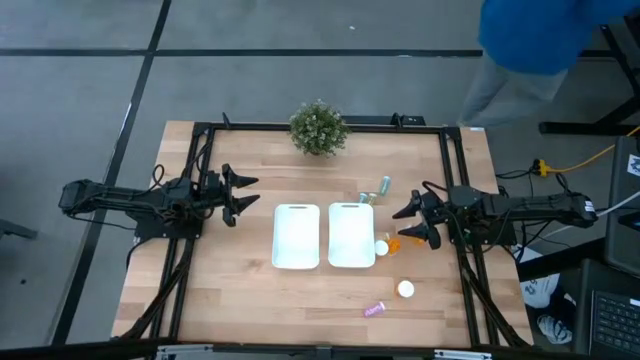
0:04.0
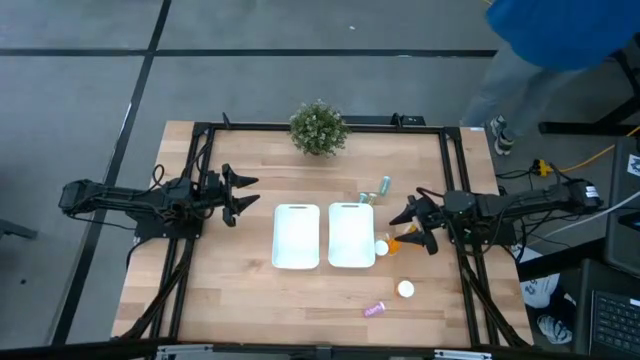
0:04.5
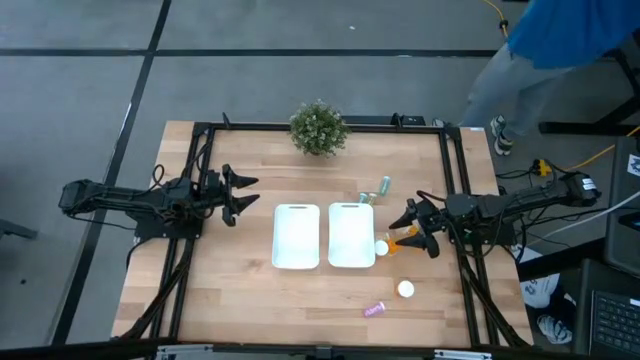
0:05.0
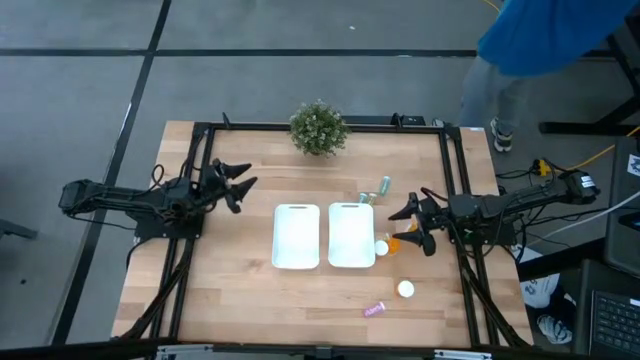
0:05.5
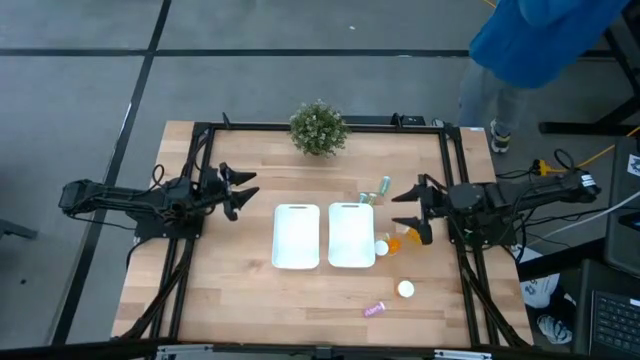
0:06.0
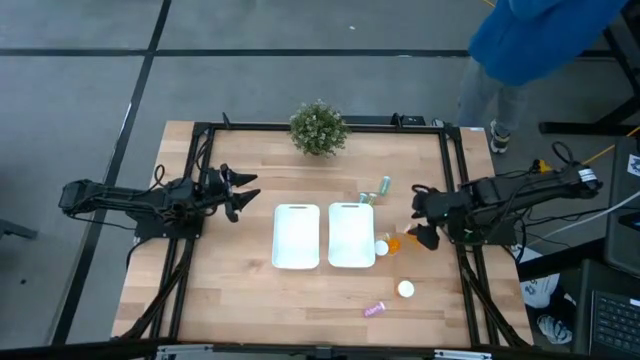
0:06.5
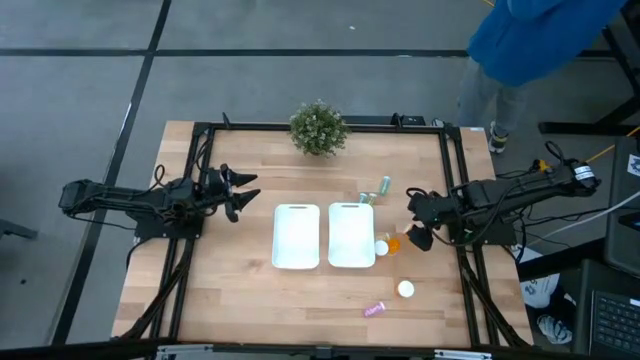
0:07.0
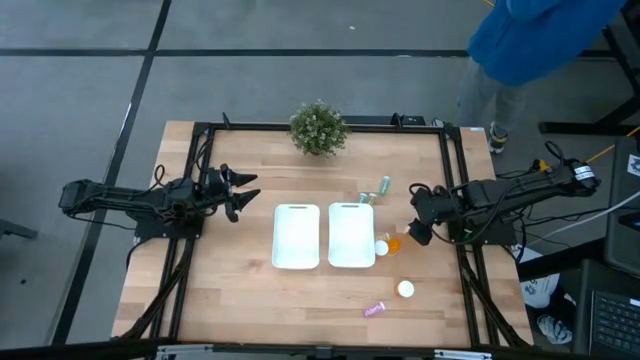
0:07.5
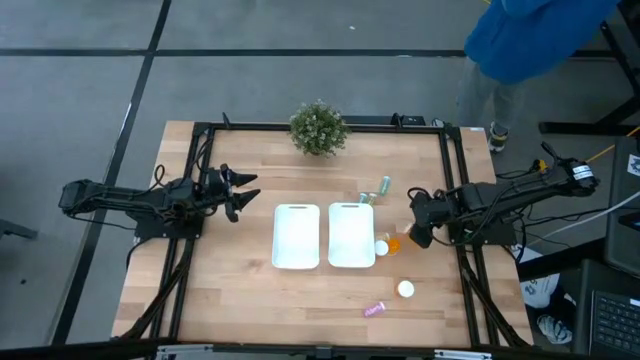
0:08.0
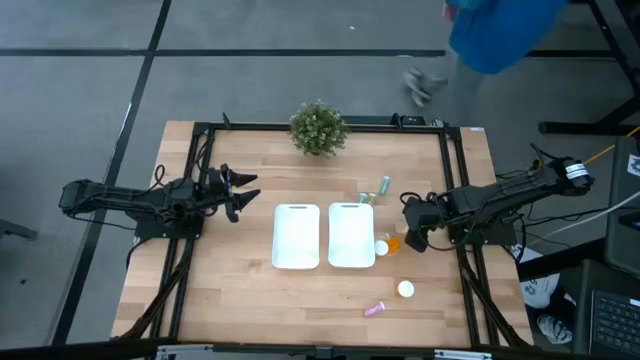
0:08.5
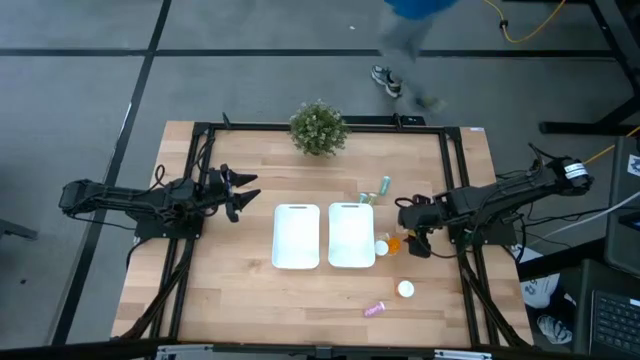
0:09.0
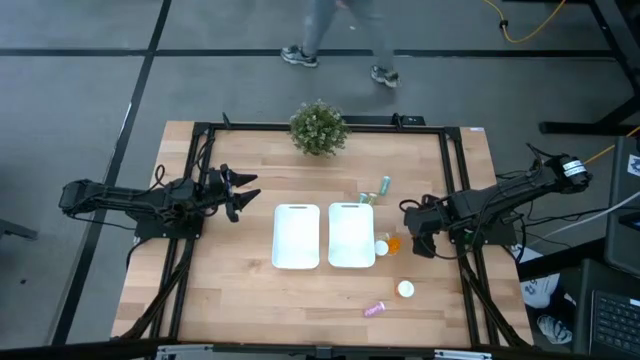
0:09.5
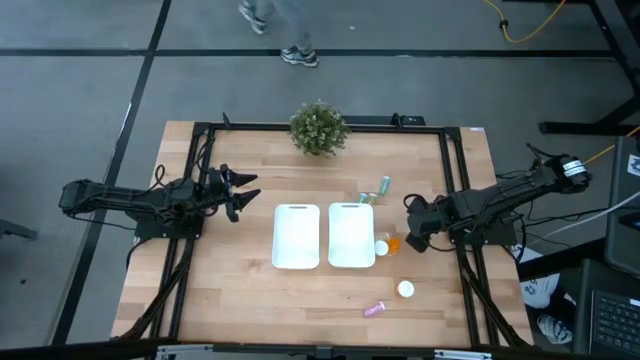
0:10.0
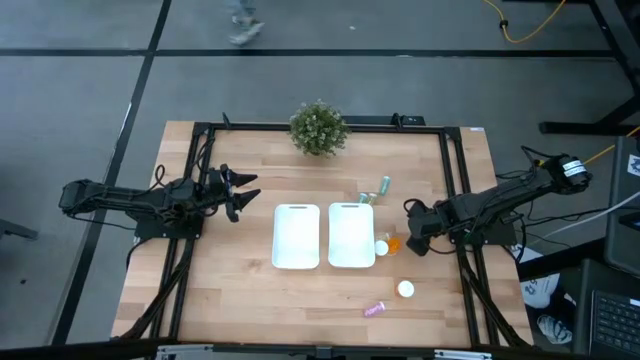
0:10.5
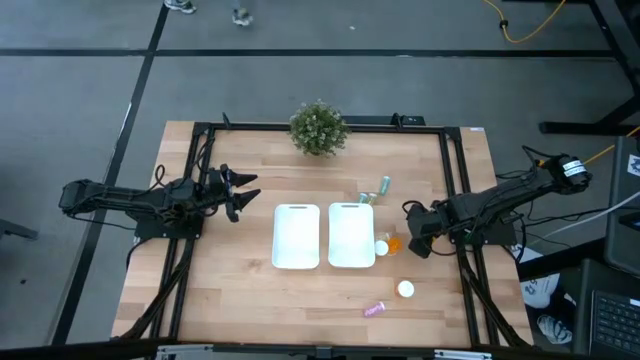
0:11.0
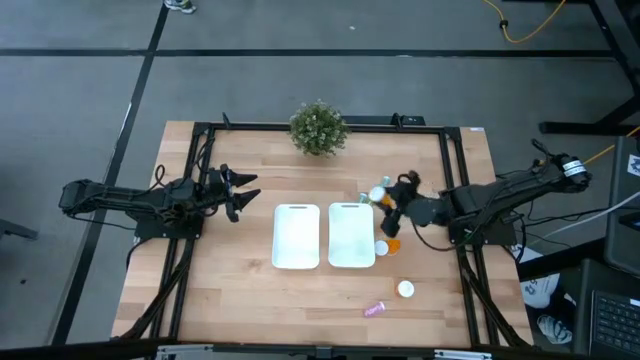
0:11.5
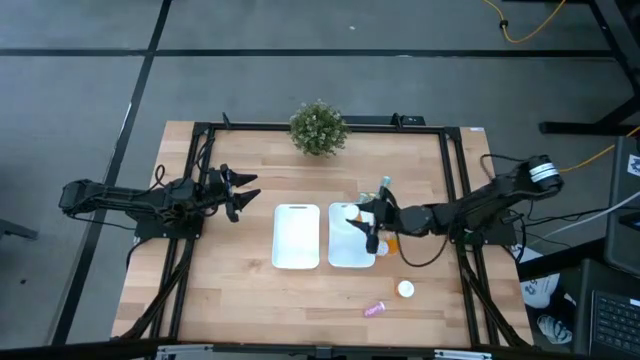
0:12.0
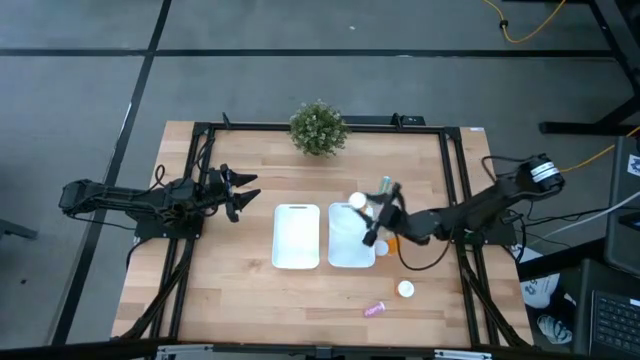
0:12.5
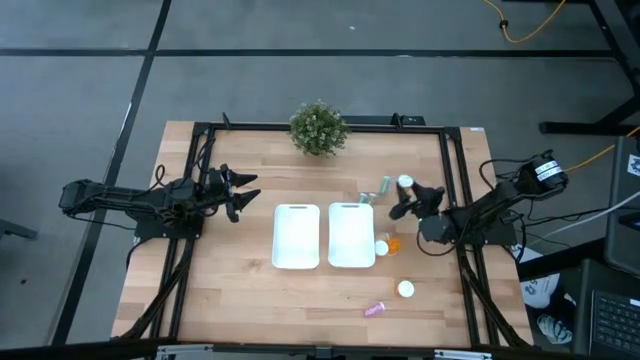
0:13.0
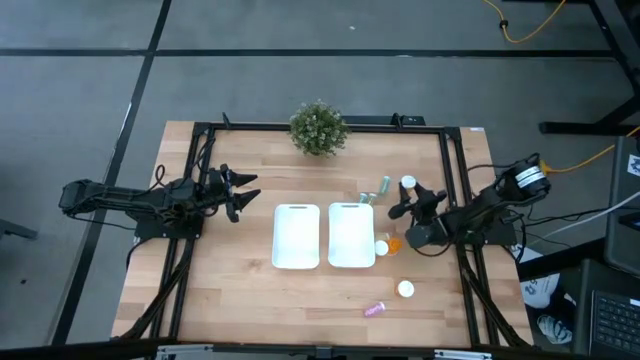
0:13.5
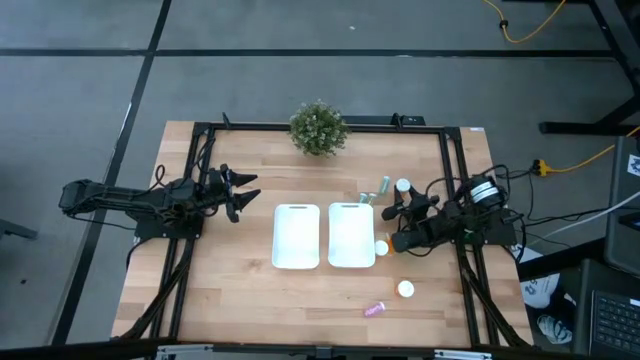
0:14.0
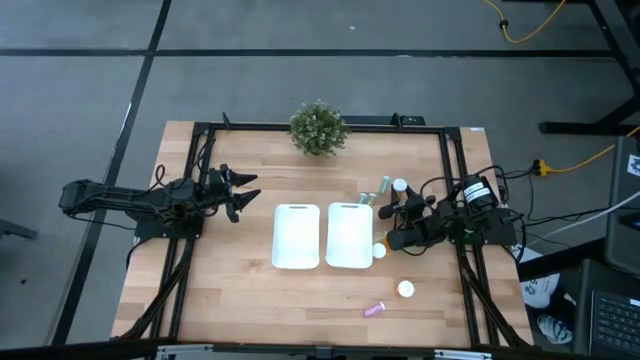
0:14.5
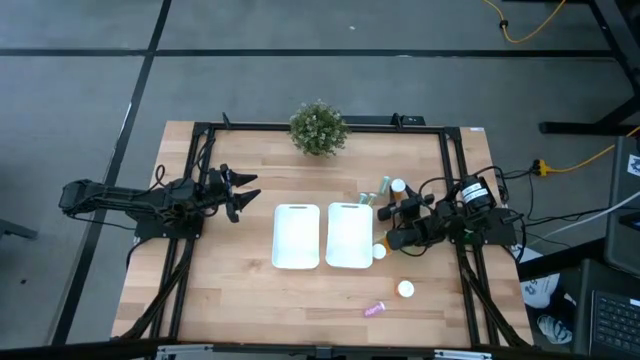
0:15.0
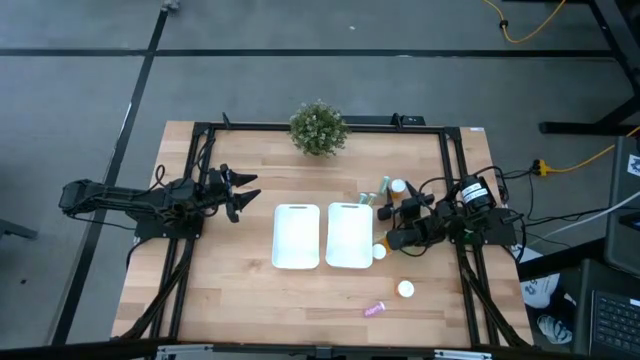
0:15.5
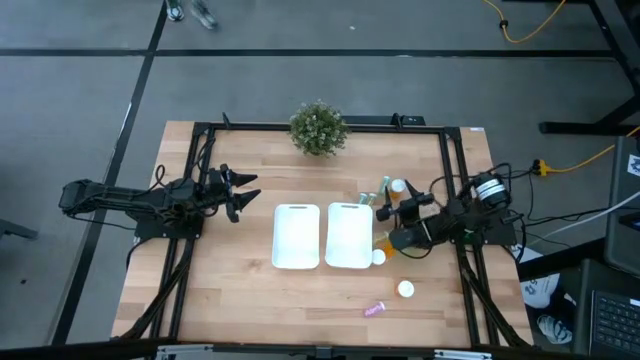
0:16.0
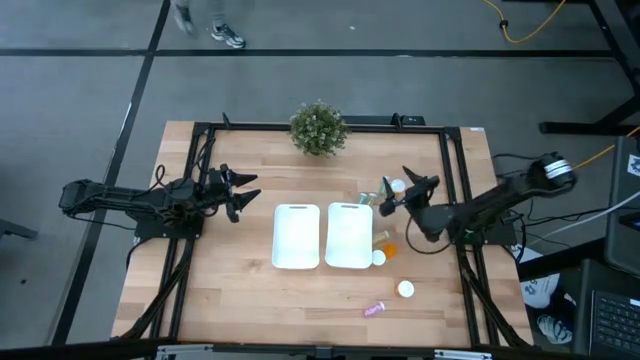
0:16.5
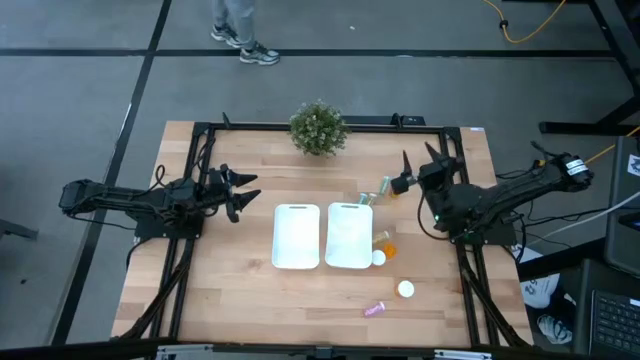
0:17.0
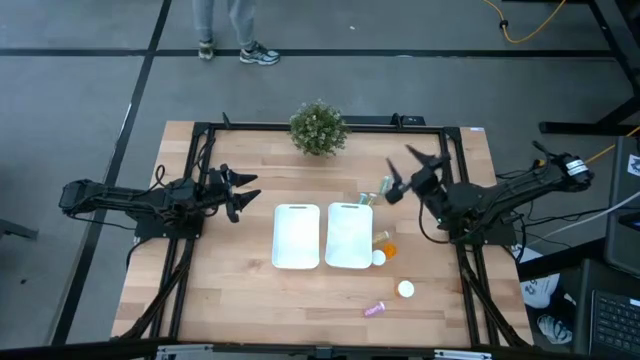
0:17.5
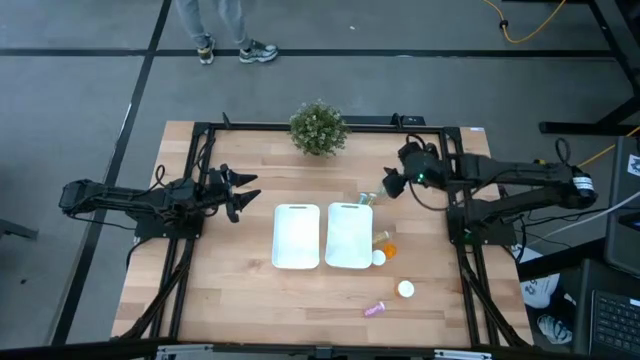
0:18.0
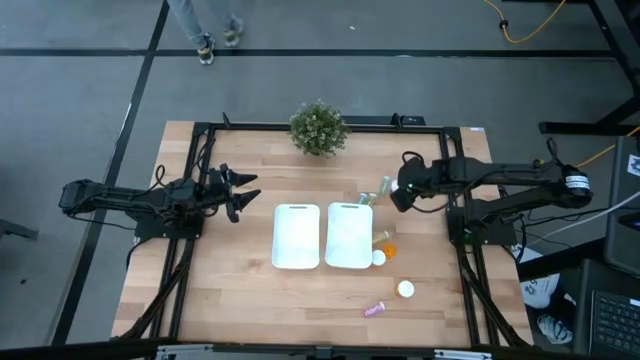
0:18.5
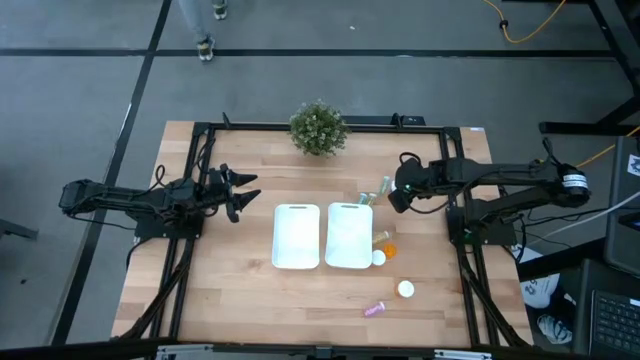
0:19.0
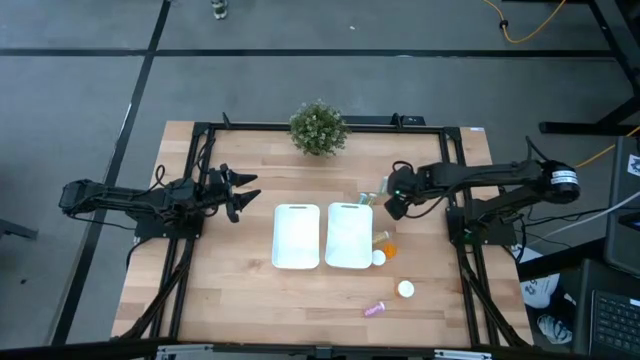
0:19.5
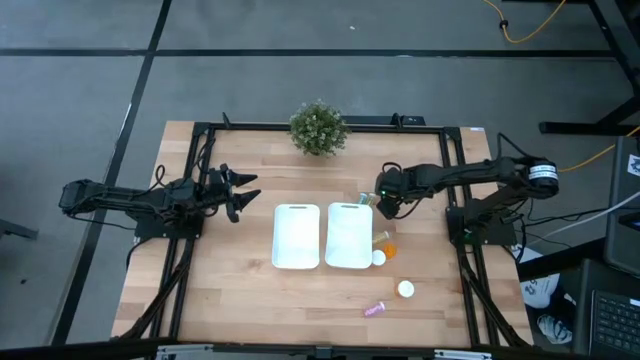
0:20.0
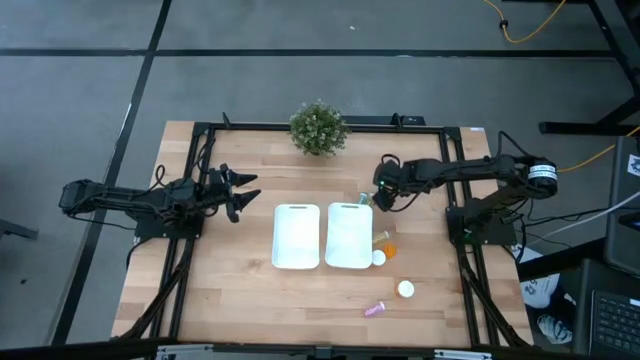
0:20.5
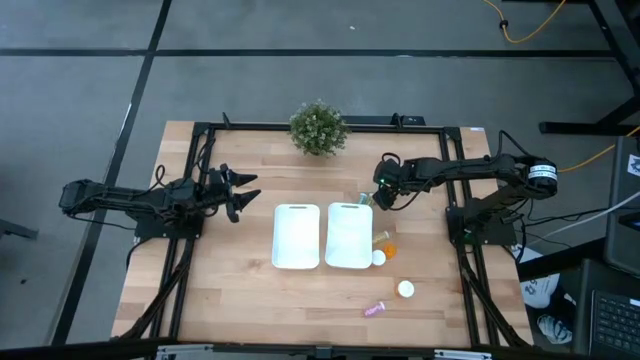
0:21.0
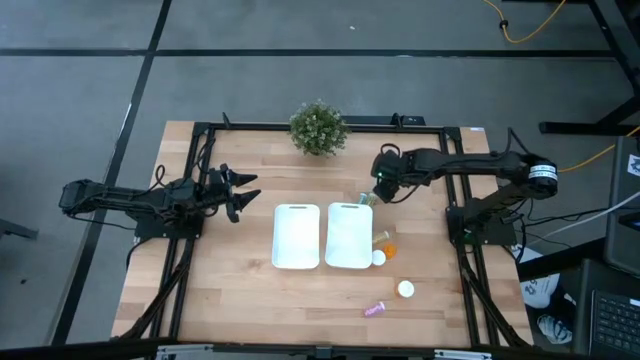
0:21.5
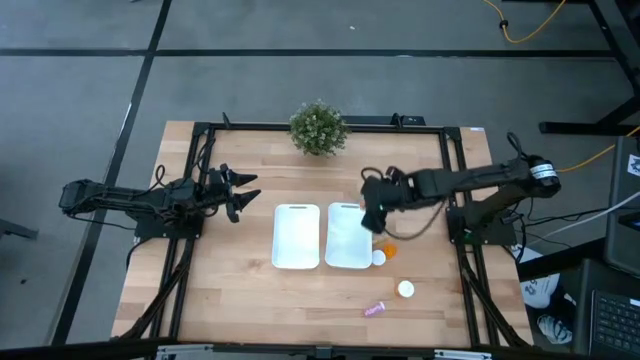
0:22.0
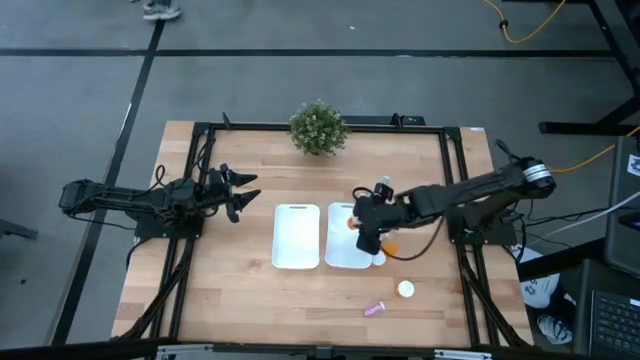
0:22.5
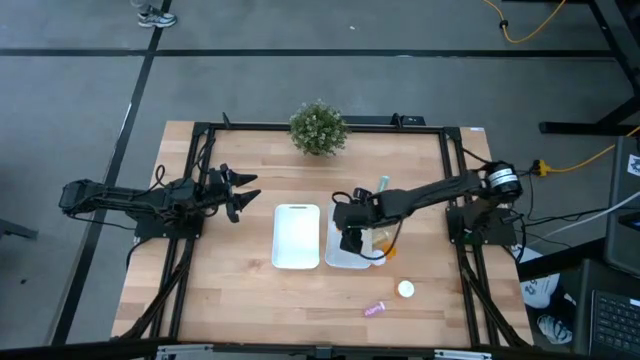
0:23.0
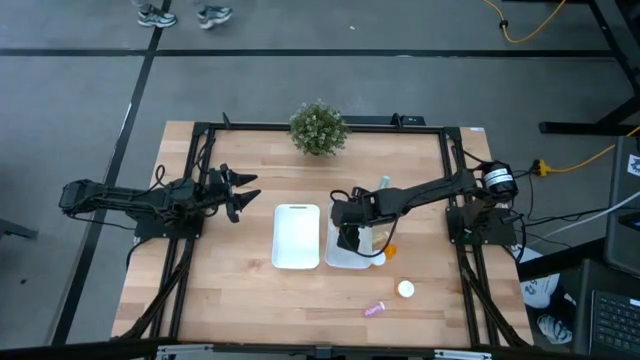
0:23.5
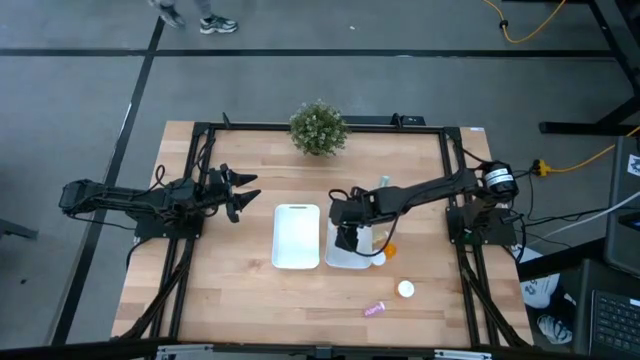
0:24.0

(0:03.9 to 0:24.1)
Task: Pick and place medicine bottles into bin by pill shape (circle, oval)
Put the orange capsule bottle into the right white bin
